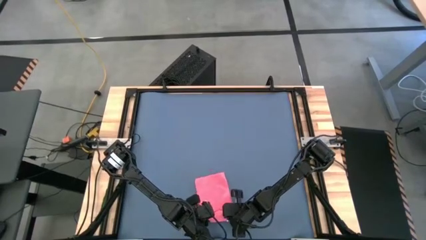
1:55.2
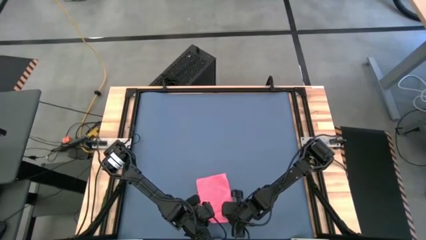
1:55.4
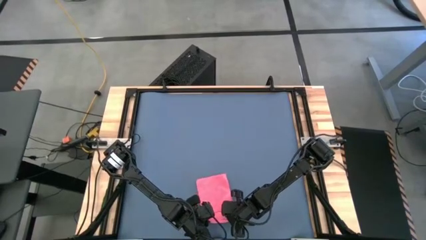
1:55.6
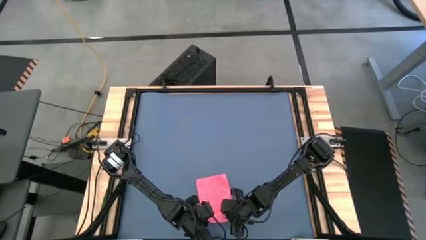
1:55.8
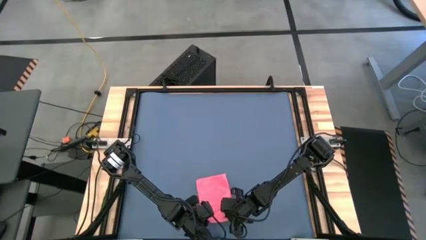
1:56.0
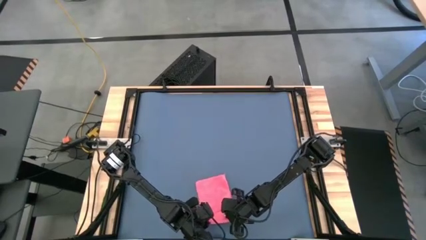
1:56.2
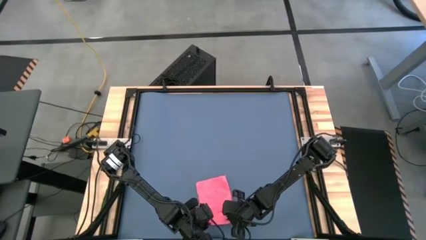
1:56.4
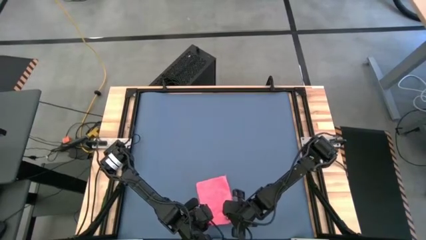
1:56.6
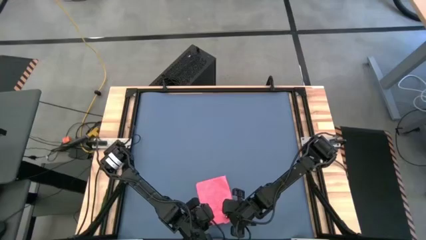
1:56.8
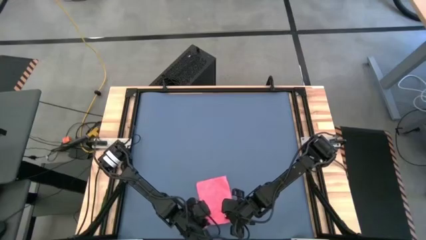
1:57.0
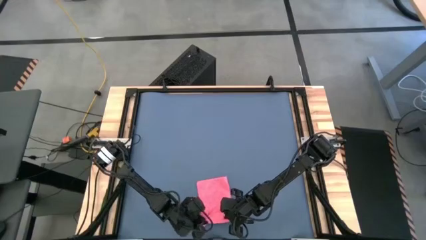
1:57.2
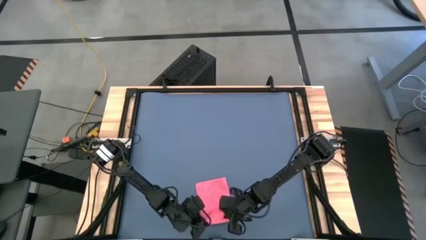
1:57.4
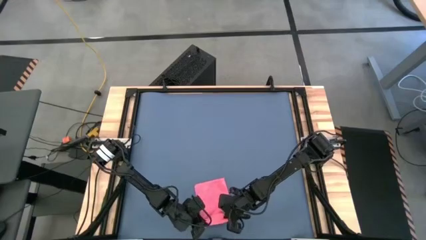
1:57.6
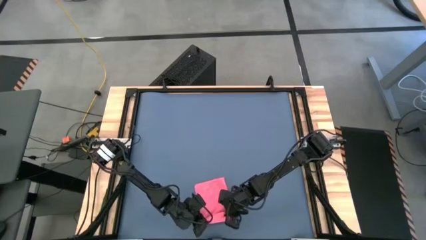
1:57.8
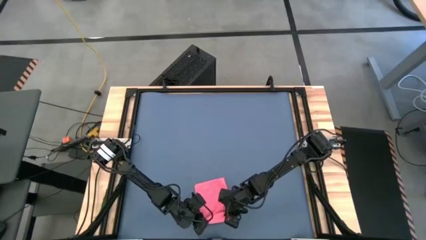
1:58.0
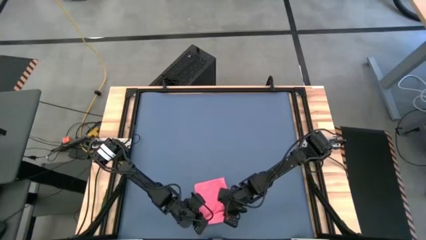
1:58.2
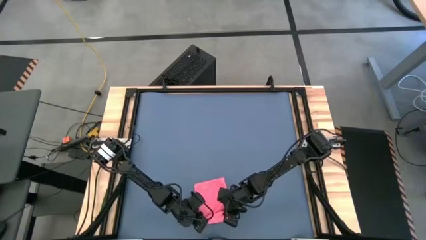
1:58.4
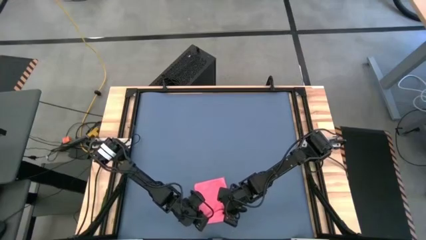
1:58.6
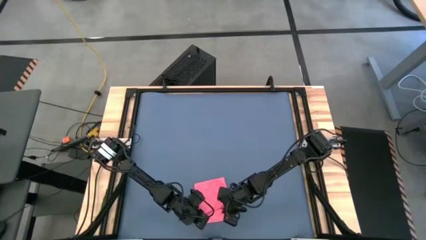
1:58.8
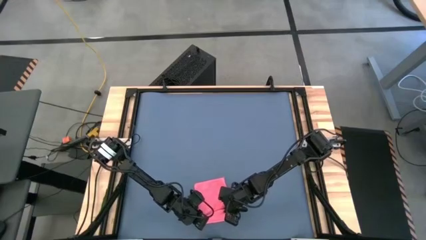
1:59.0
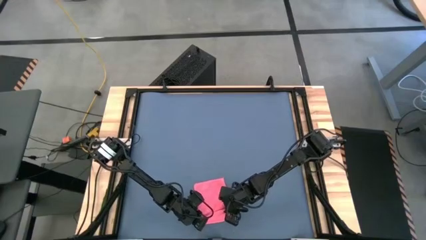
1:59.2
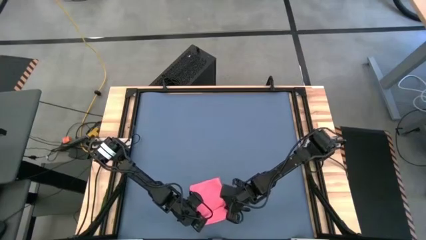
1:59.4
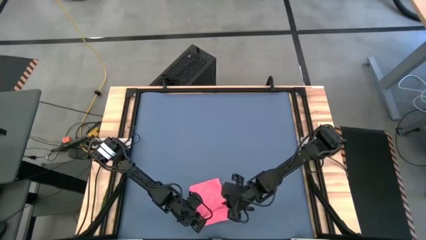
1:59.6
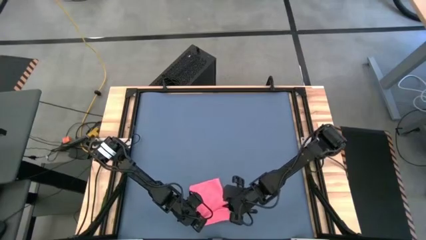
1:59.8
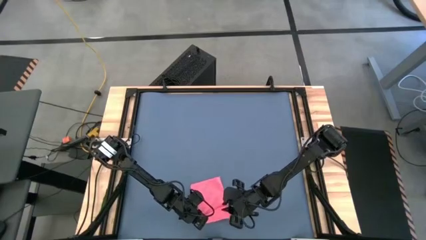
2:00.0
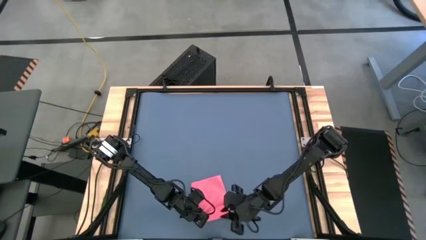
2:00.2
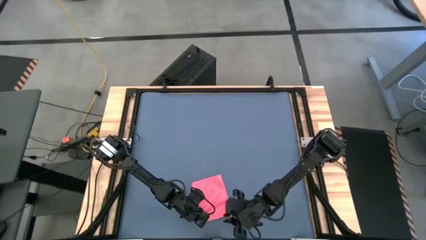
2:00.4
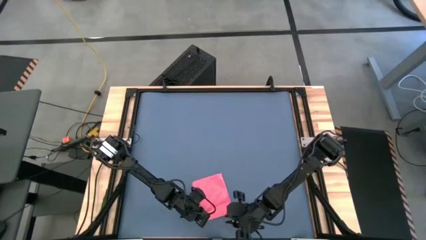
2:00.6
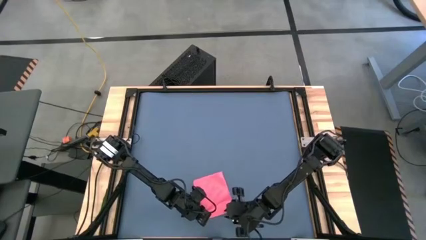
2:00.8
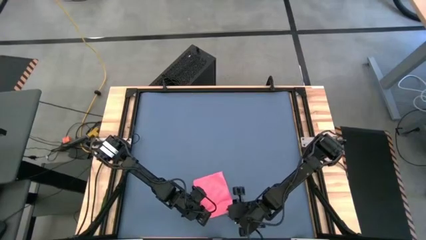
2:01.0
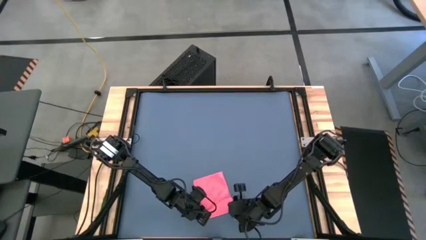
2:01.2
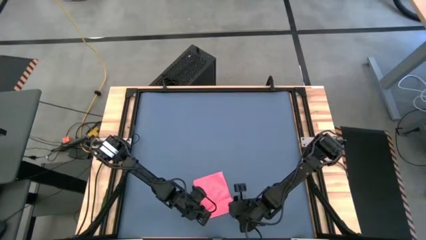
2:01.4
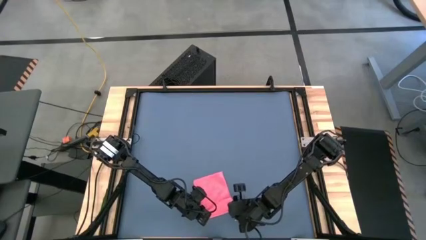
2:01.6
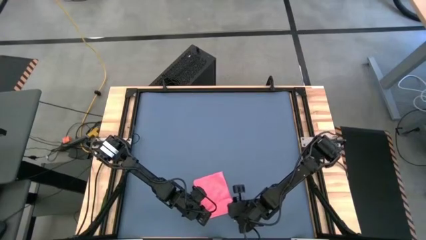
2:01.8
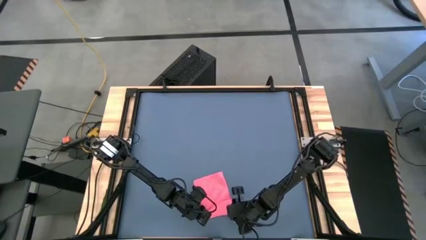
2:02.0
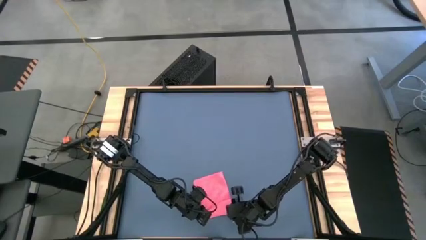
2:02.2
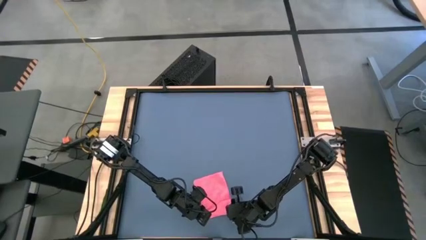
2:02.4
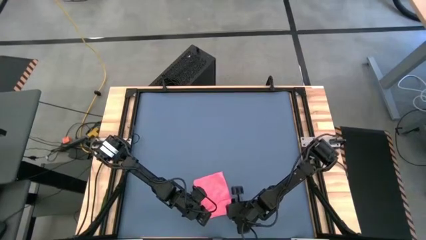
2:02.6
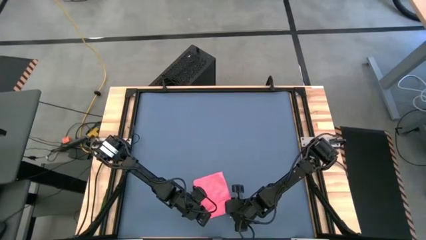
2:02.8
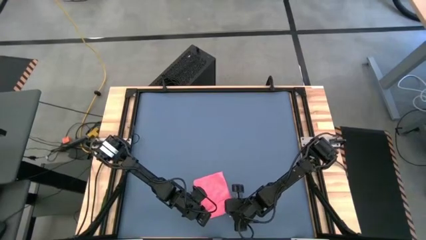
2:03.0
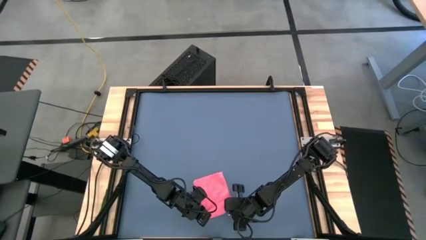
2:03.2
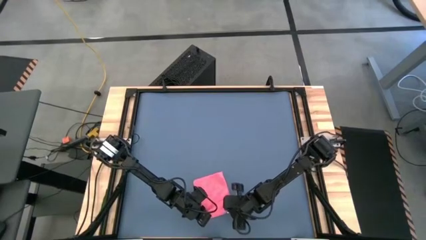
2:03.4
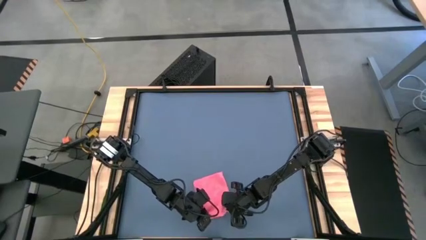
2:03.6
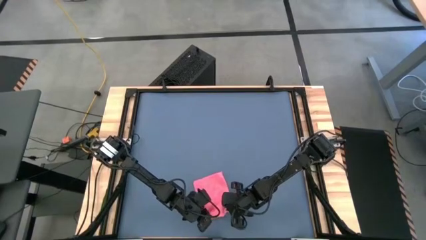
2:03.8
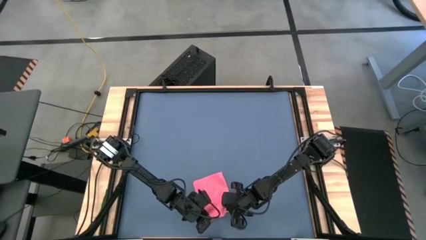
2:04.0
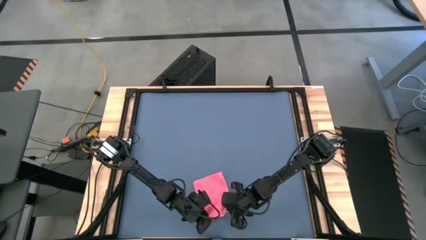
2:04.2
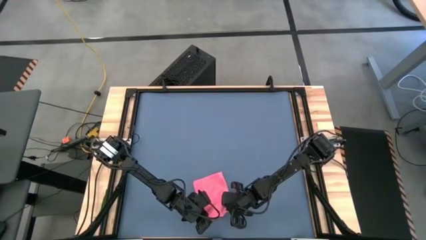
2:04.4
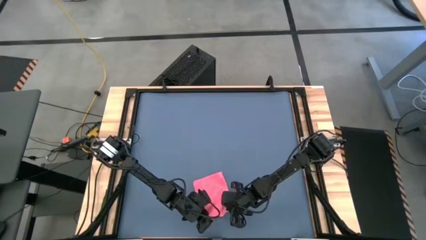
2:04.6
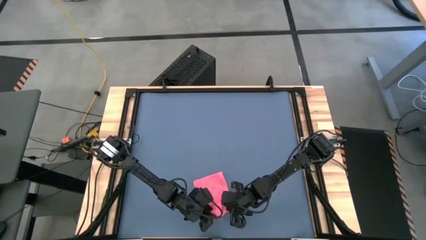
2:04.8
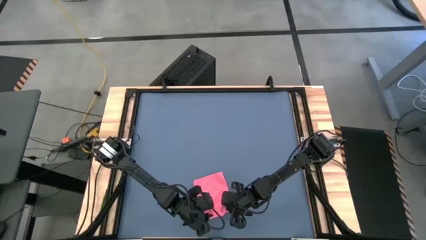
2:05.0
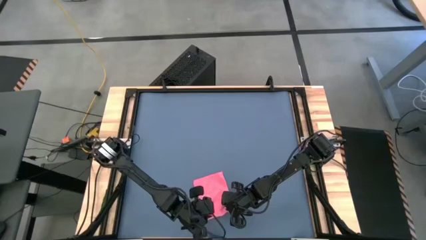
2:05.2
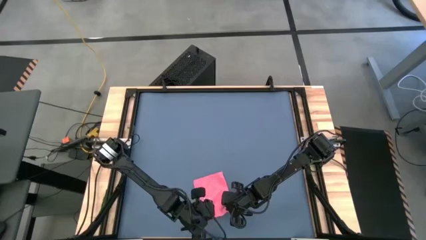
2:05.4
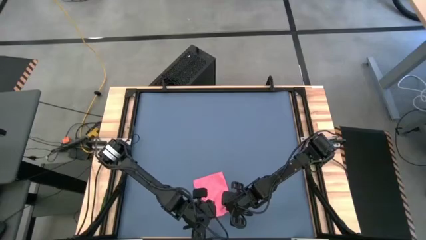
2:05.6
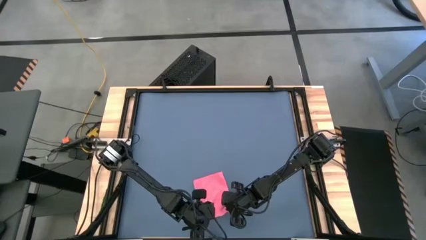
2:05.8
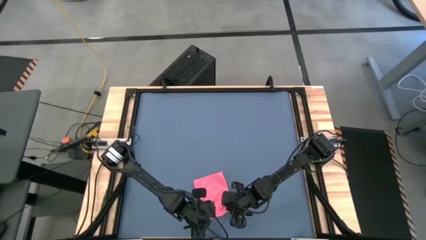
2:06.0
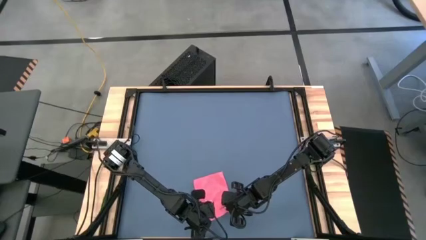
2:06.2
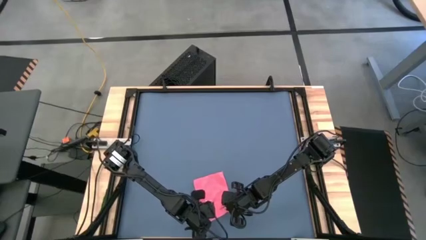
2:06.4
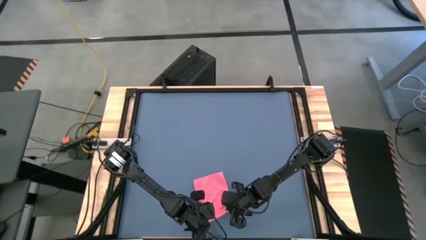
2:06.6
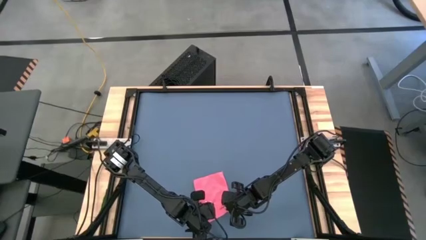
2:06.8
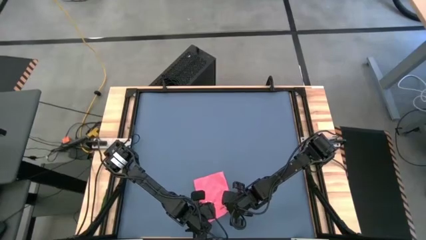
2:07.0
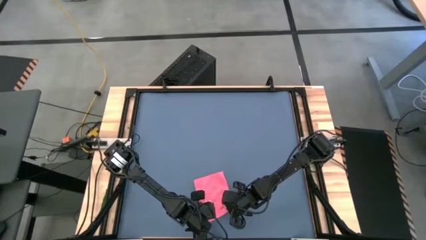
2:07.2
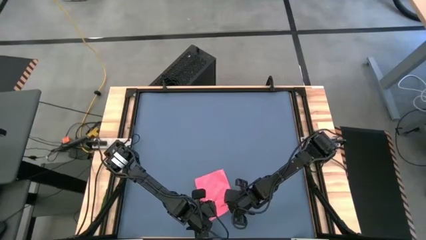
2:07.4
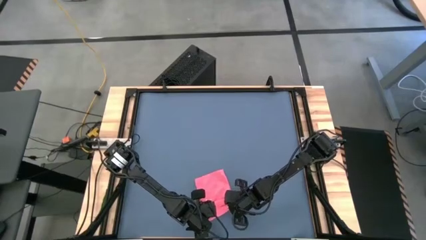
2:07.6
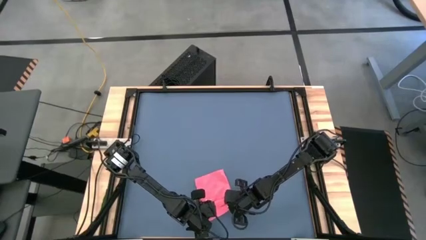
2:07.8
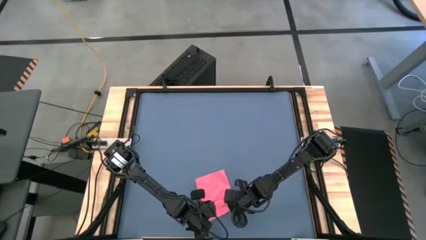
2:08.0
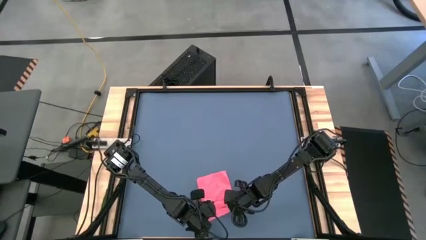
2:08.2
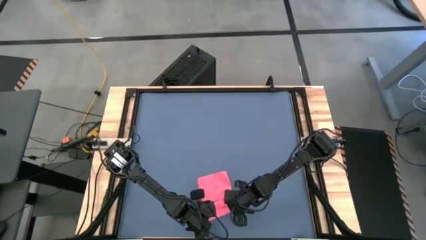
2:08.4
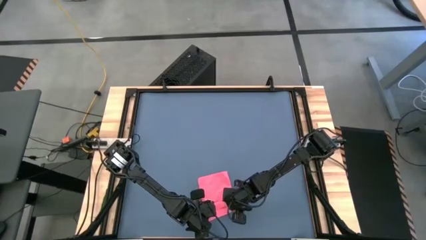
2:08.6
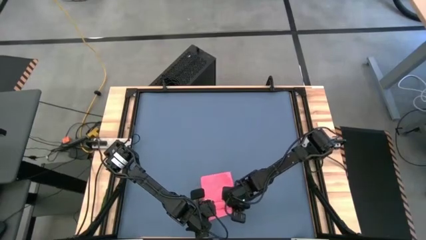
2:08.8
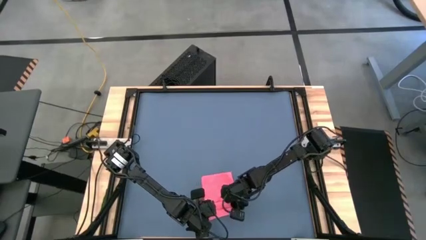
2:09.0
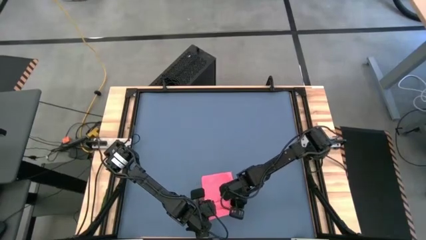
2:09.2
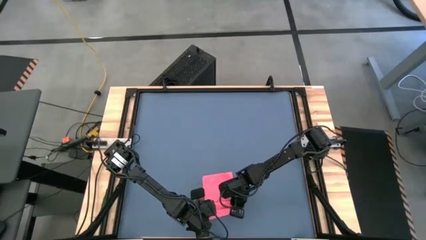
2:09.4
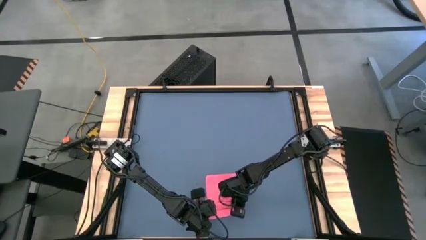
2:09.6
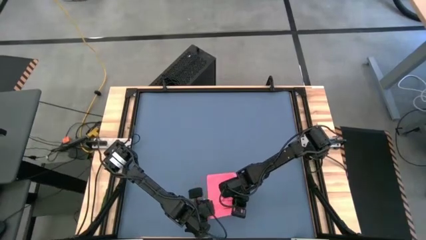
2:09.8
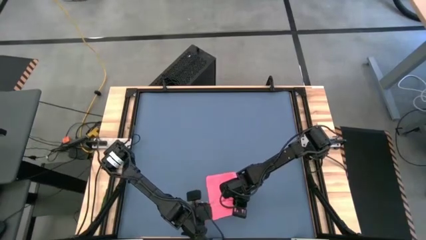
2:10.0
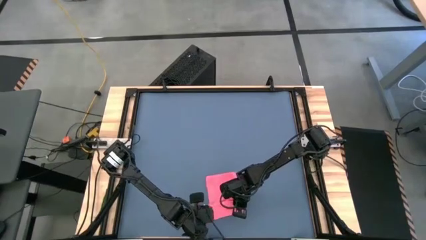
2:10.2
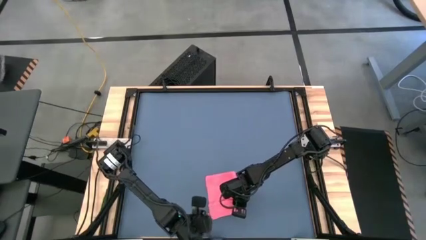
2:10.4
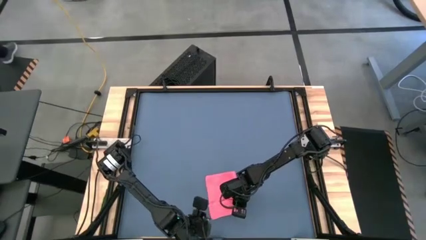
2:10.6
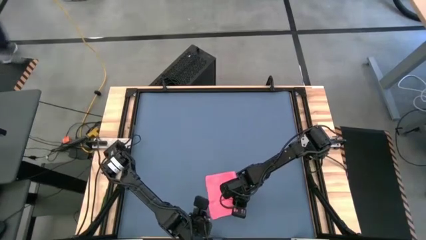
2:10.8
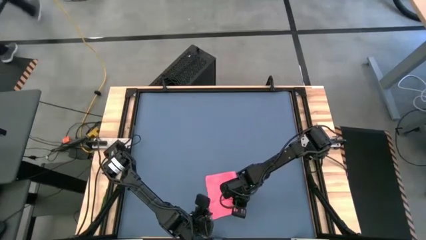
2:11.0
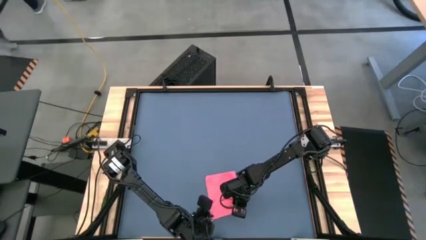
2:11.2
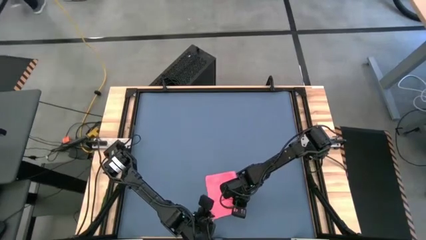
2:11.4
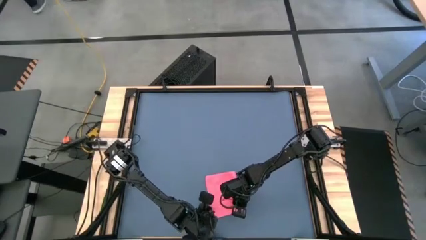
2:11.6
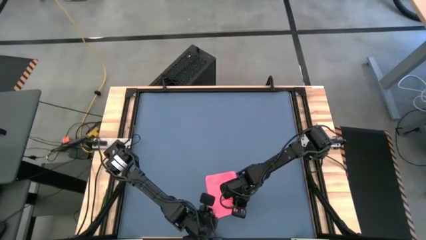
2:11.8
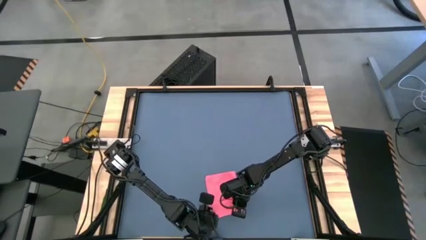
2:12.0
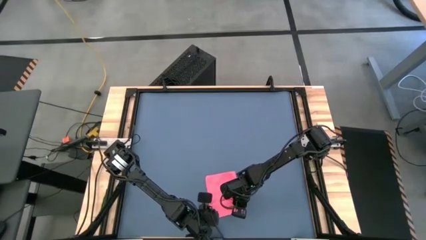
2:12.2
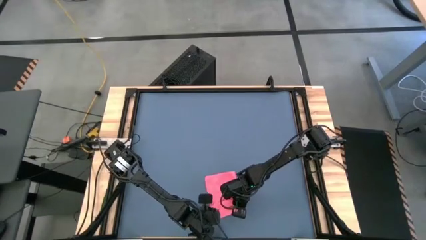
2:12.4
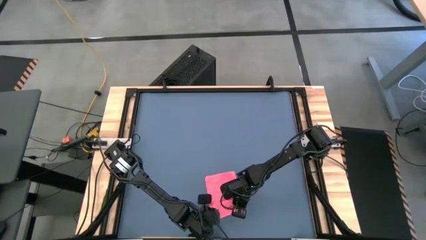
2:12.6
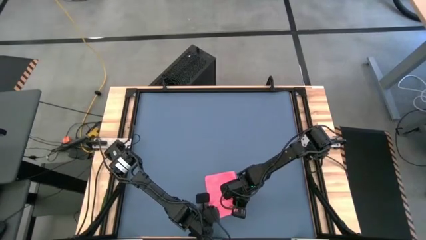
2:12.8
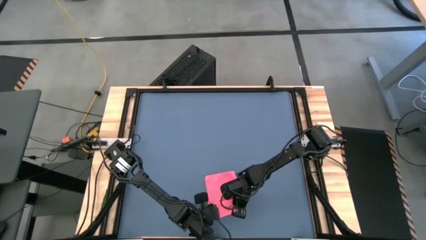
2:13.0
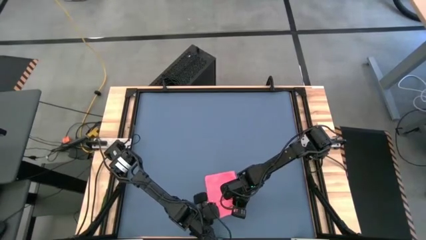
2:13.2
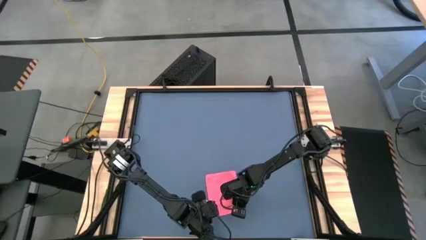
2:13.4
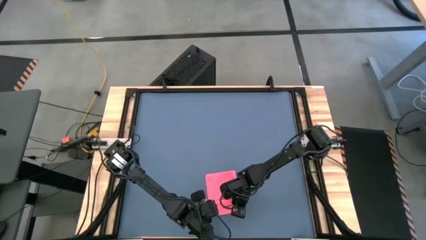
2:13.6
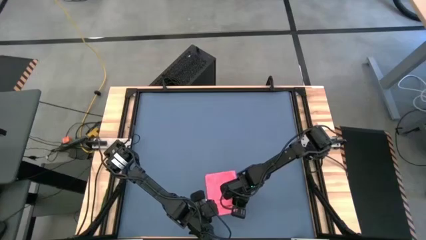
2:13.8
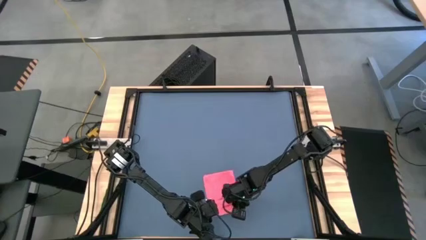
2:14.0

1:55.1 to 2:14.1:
Task: Roll towel
Roll the pink towel
